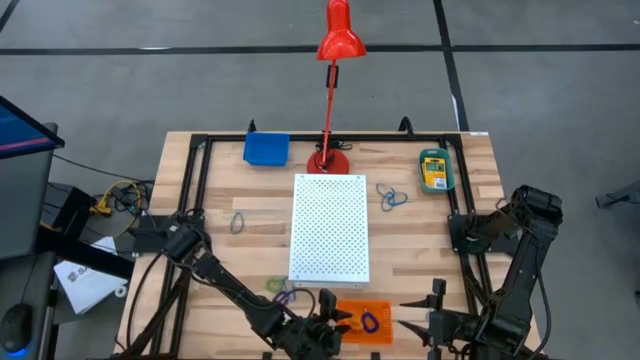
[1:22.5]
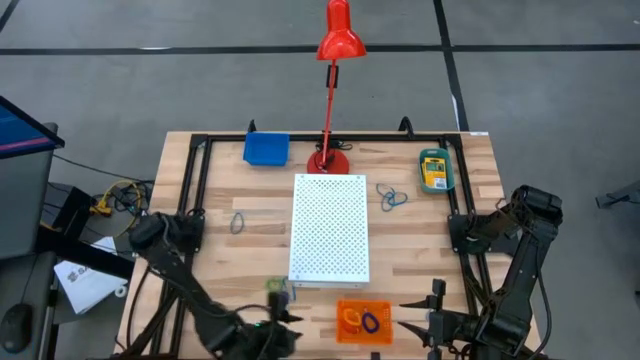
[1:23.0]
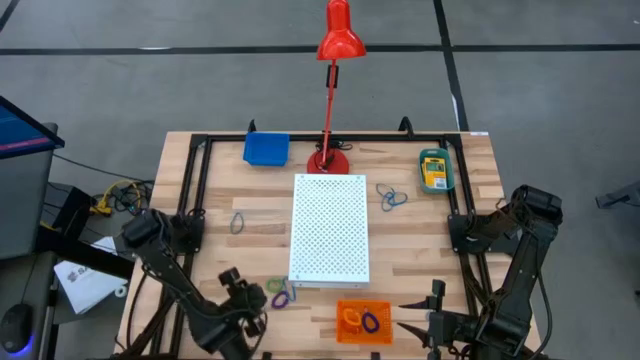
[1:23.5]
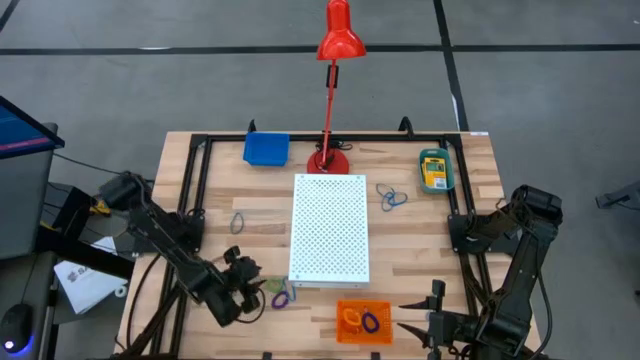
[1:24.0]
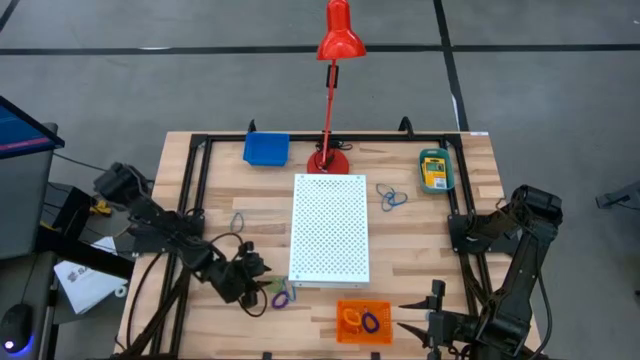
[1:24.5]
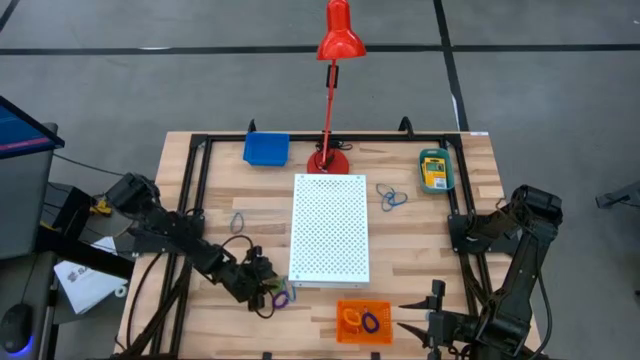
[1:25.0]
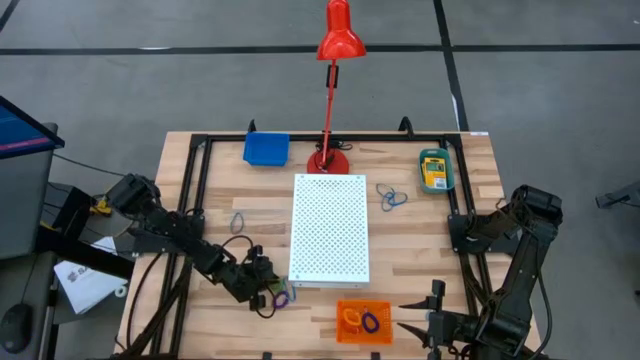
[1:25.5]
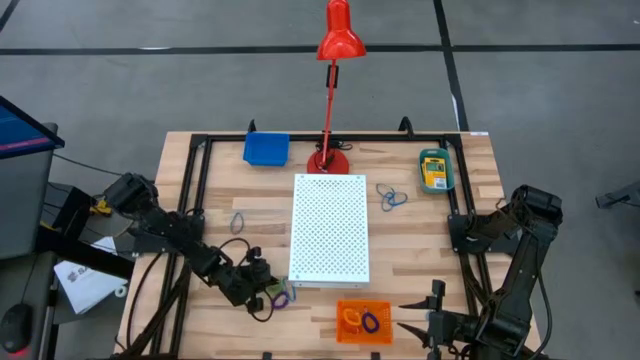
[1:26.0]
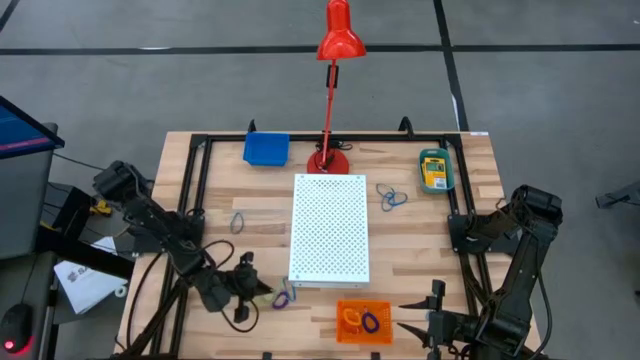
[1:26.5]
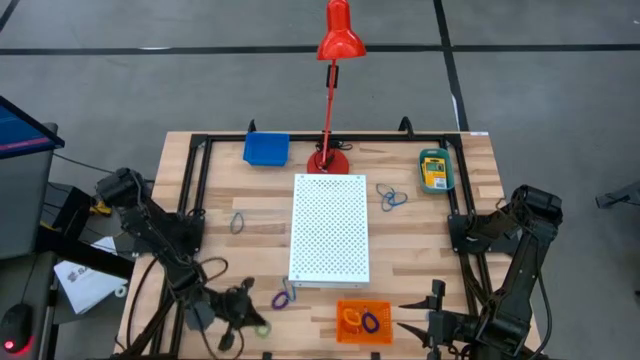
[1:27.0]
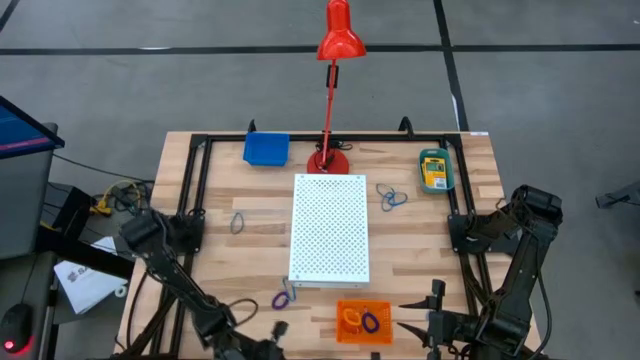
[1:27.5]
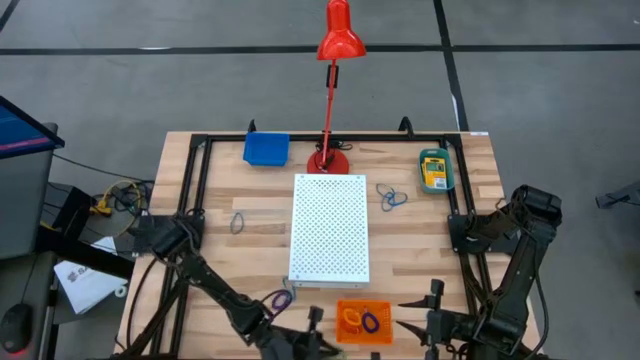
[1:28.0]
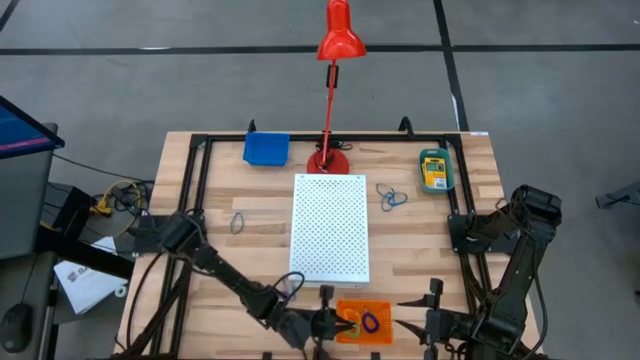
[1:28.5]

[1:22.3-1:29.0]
Task: Pick & Place Office Desk Supplies
Put the green spring keychain into the orange bin

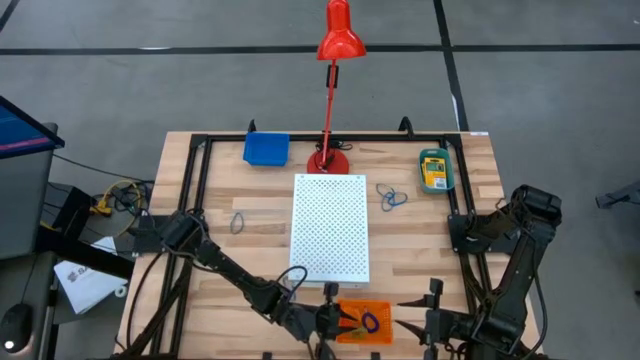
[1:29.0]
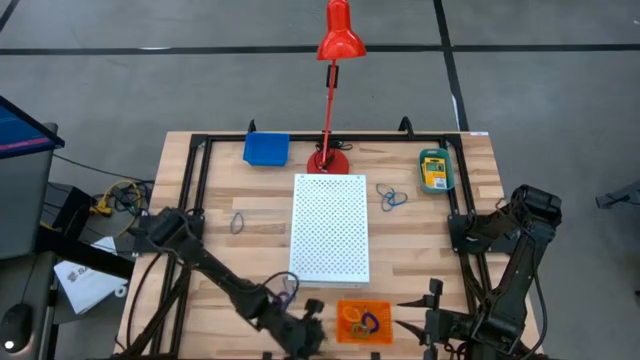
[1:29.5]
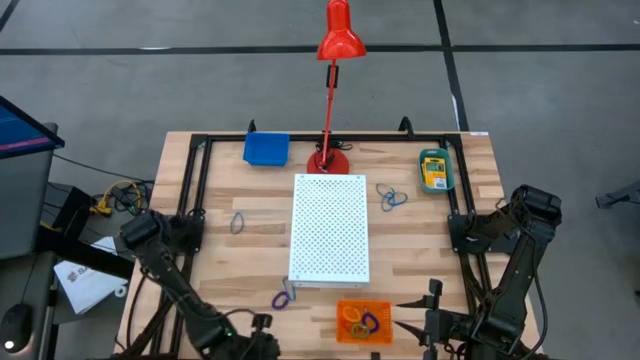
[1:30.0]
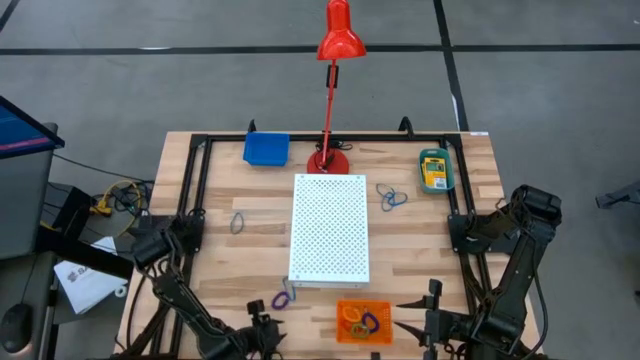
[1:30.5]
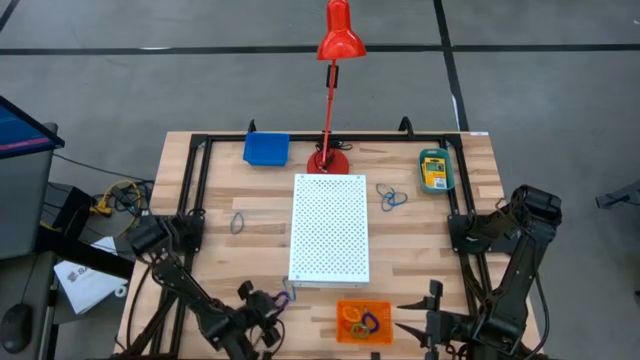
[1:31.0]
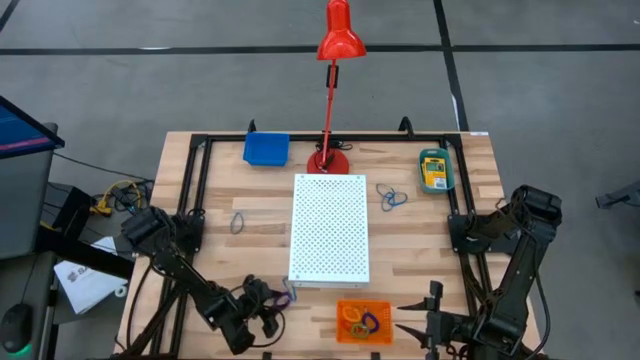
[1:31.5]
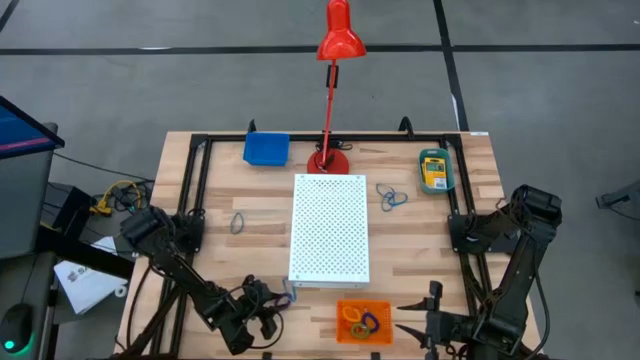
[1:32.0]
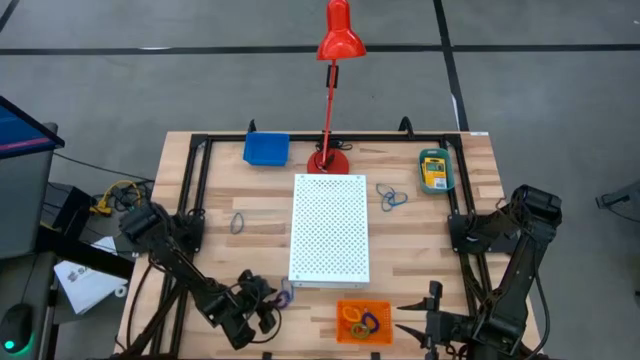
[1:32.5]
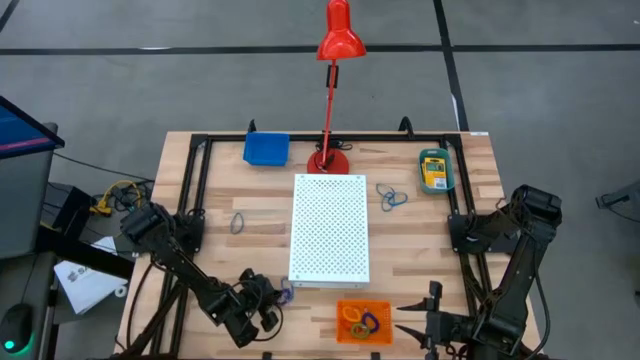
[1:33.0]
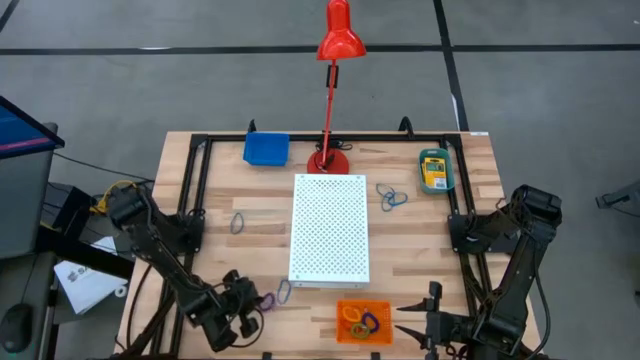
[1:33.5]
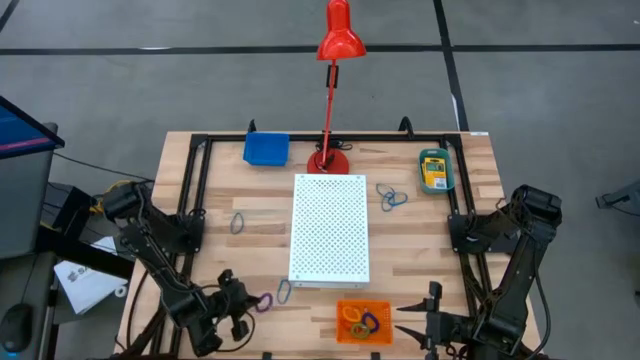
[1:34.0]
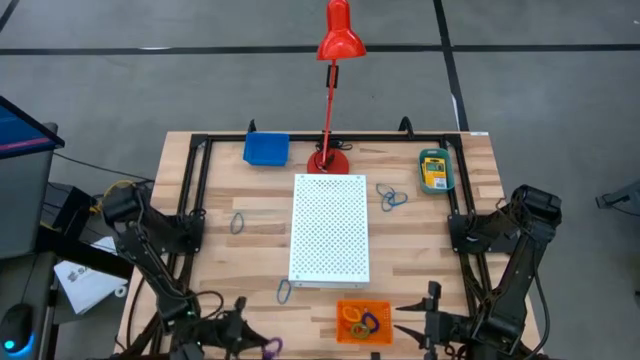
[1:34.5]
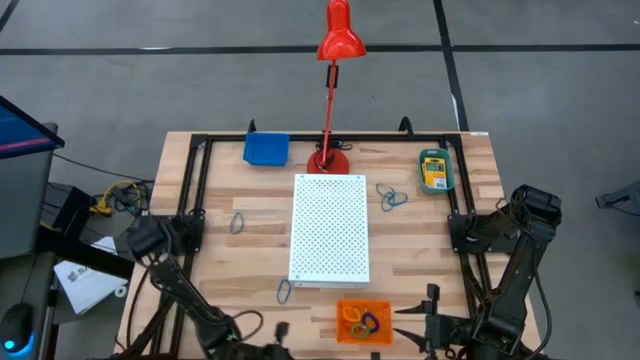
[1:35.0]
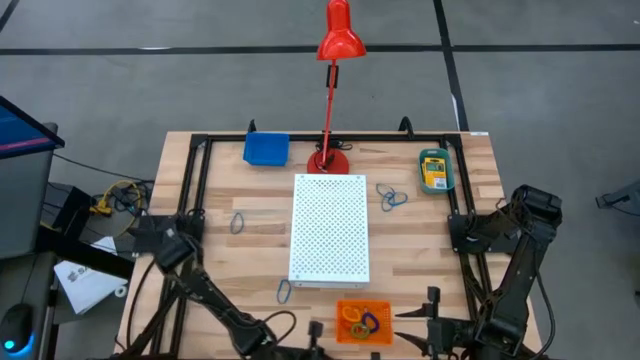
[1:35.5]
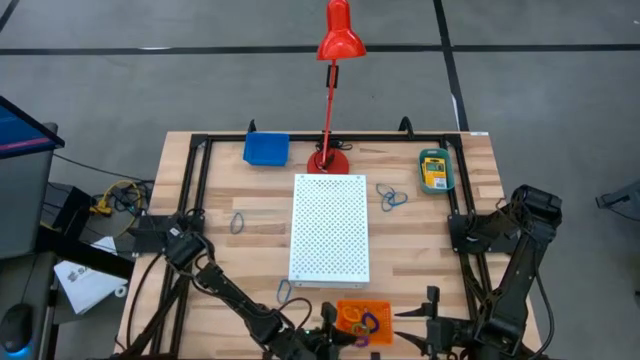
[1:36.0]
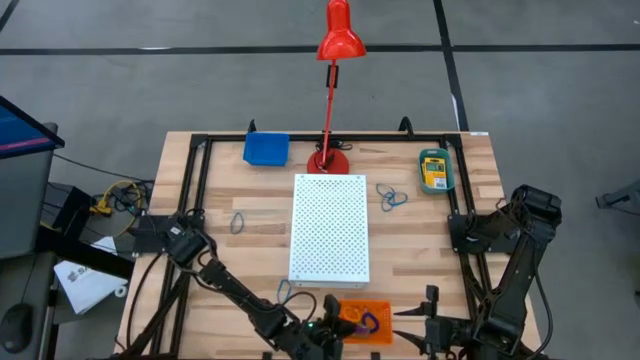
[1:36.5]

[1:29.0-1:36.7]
Put the violet spring keychain into the orange bin

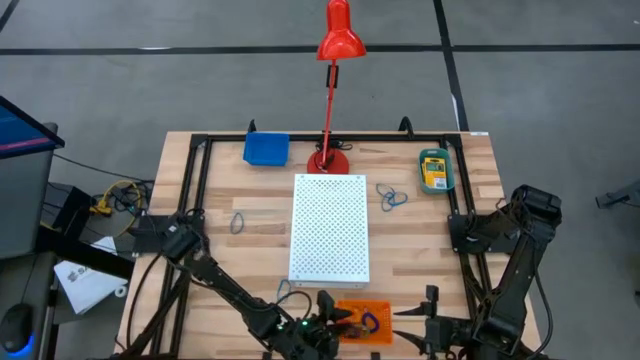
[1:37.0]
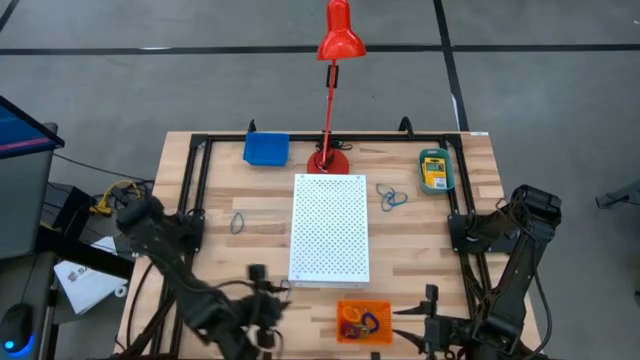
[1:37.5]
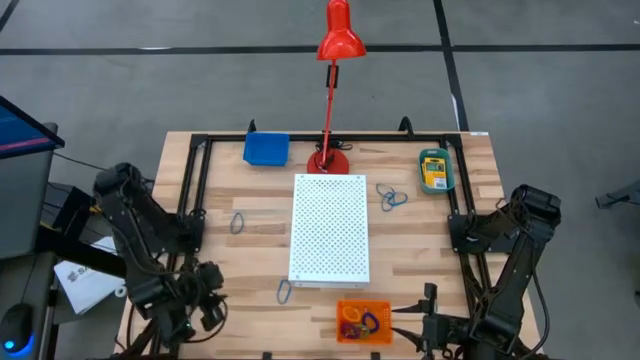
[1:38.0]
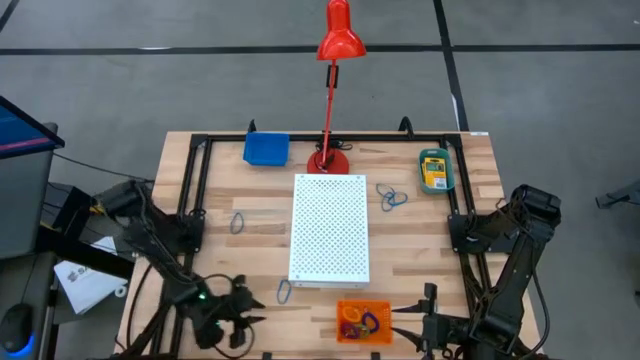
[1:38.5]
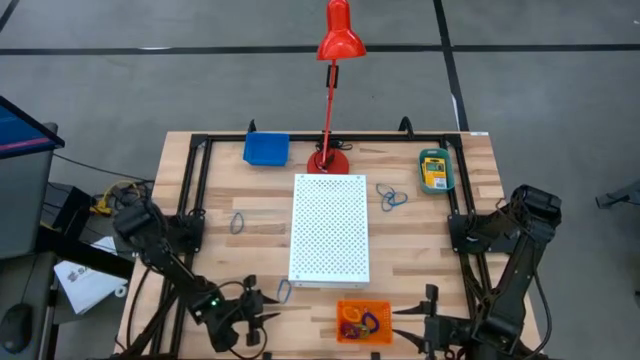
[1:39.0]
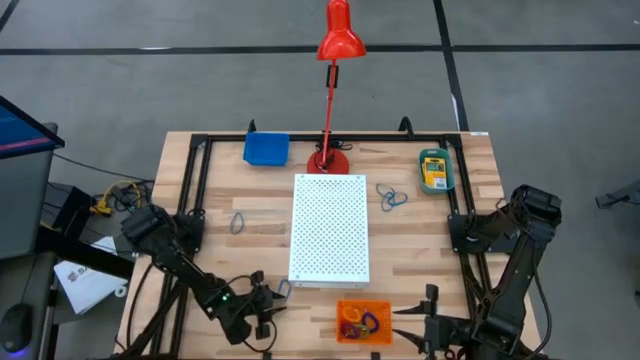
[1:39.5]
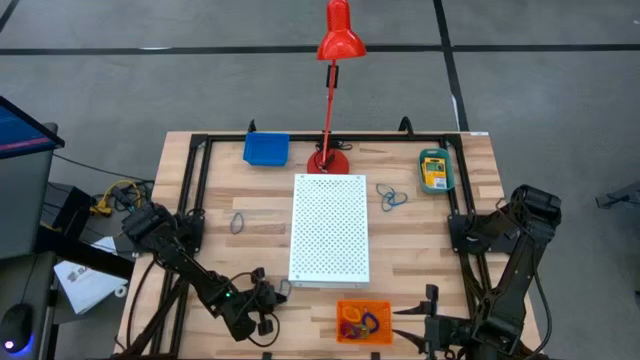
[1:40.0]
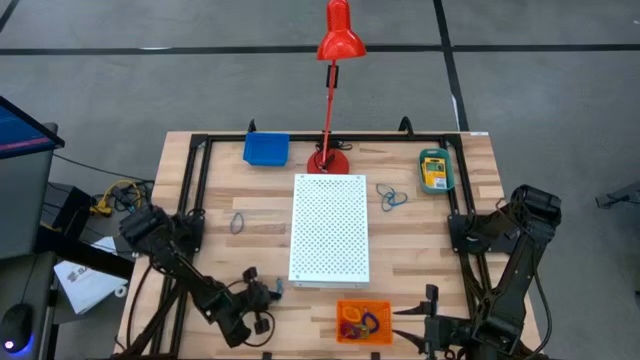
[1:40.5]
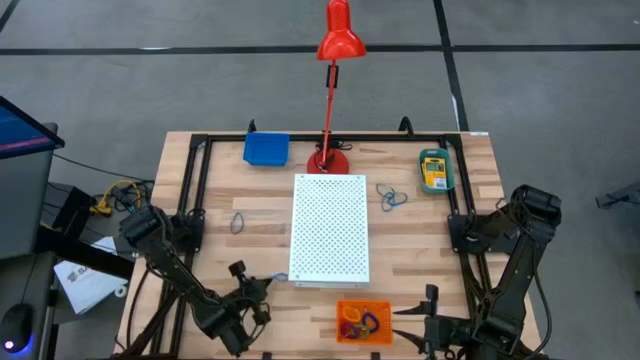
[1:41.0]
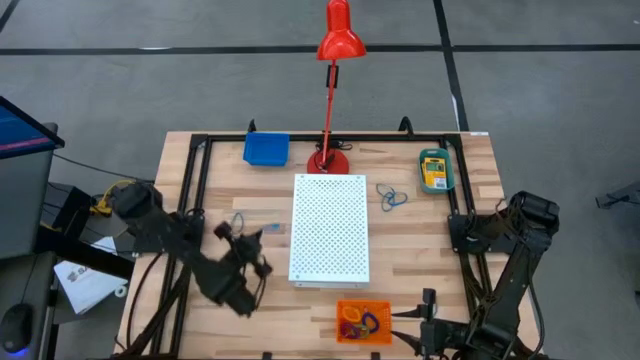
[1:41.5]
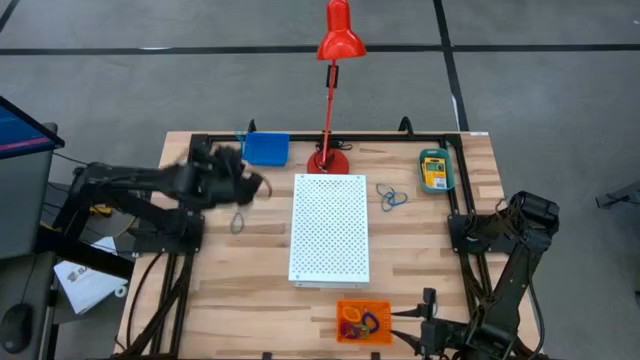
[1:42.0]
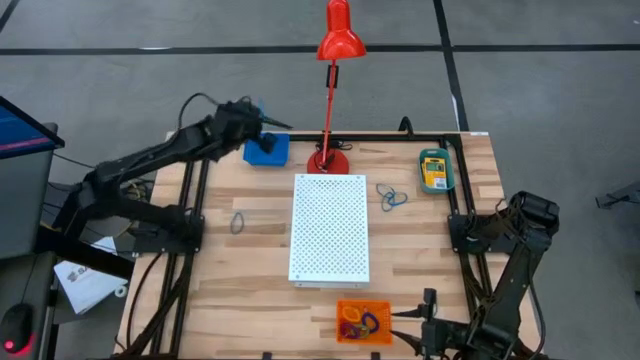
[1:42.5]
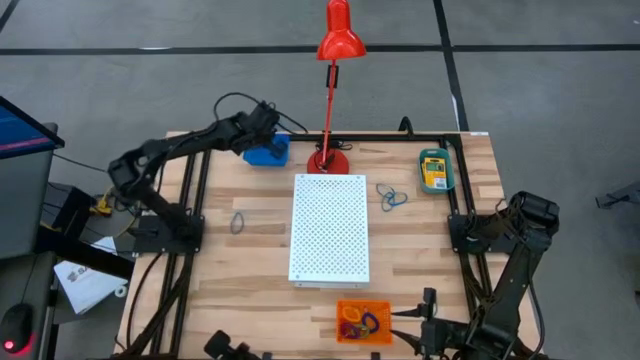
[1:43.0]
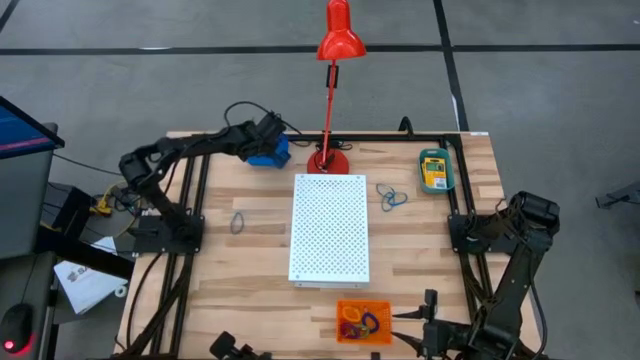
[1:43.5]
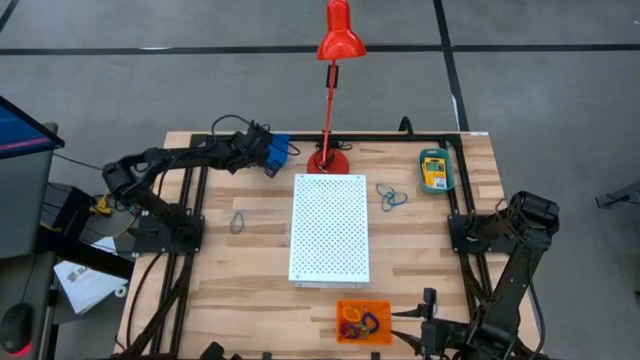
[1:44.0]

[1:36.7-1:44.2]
Put the blue rubber band into the blue bin

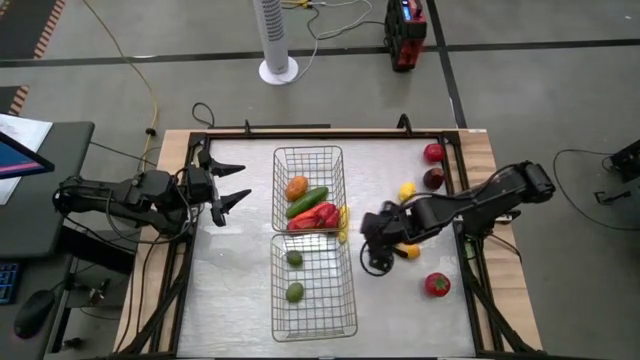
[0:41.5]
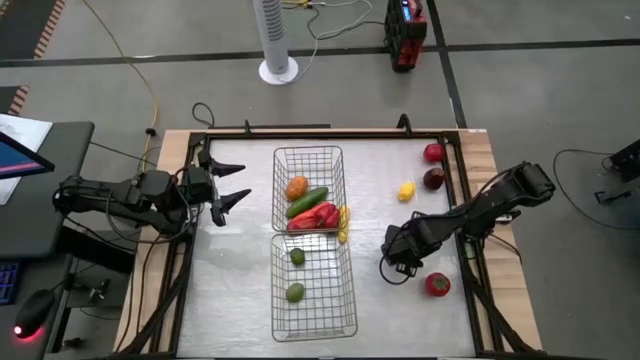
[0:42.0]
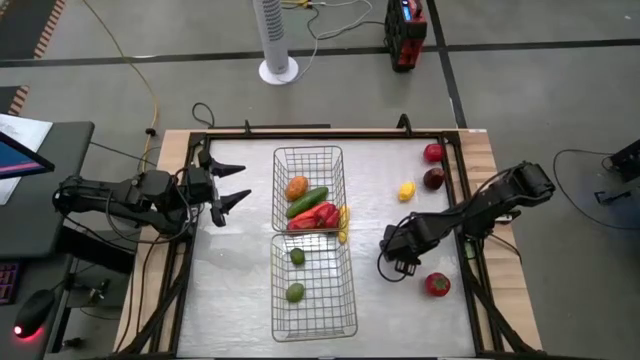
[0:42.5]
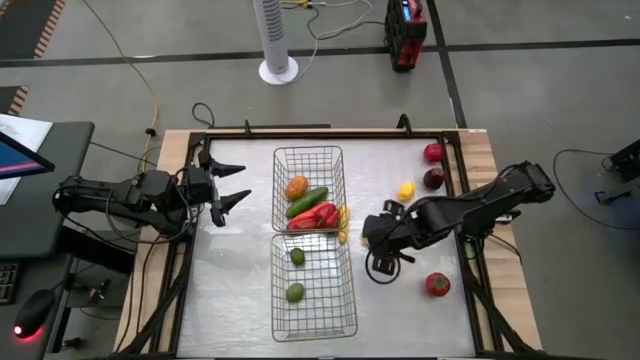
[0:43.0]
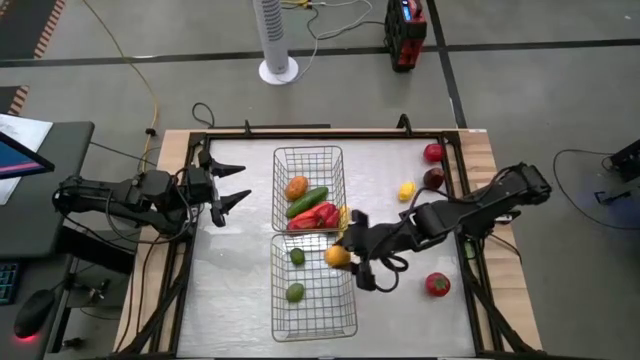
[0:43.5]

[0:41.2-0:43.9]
Task: Sort produce into baskets
Put the lemon into the bottom wire basket
